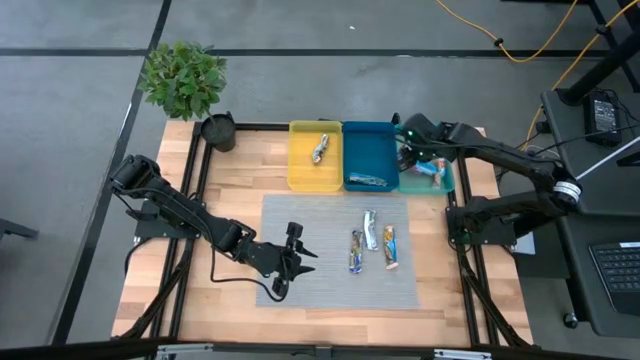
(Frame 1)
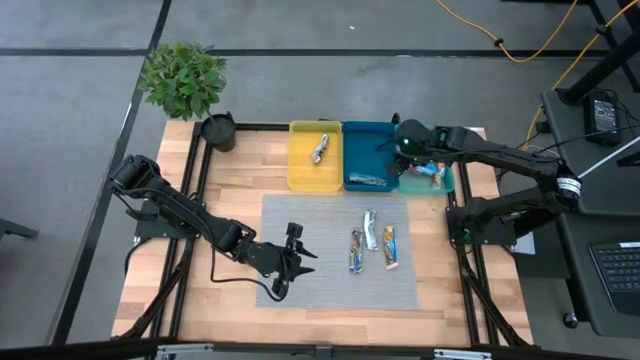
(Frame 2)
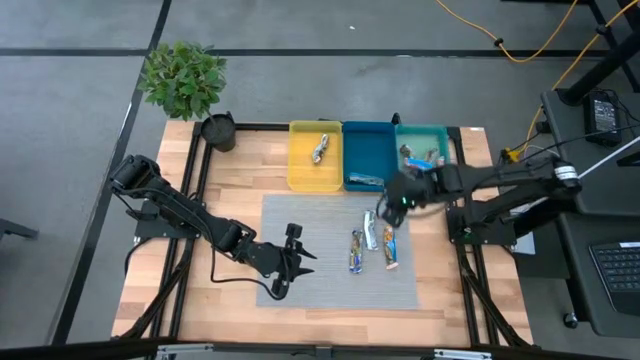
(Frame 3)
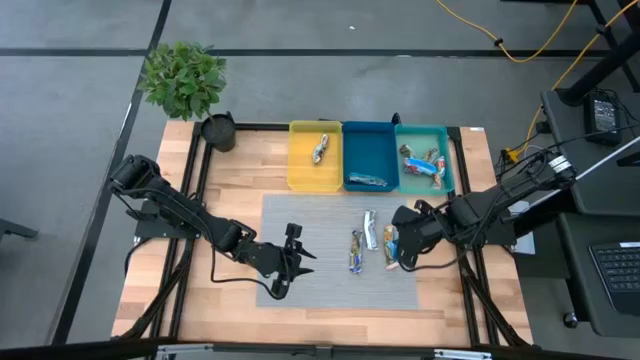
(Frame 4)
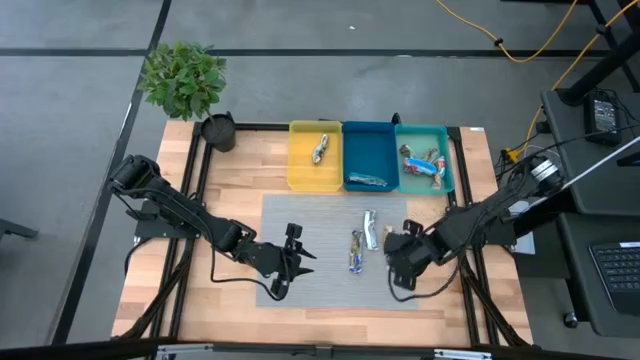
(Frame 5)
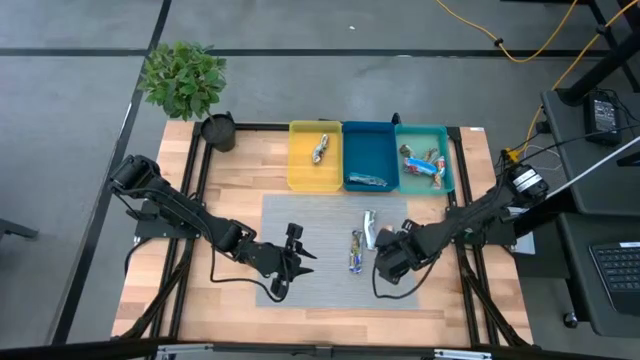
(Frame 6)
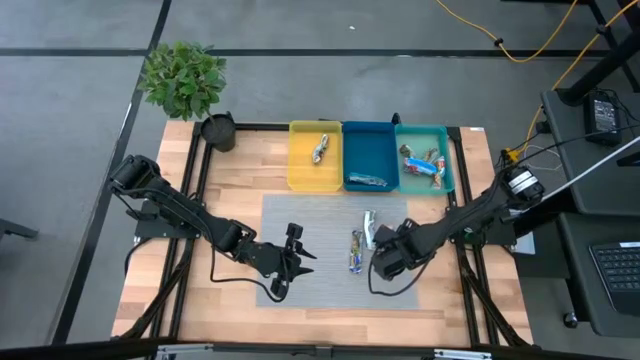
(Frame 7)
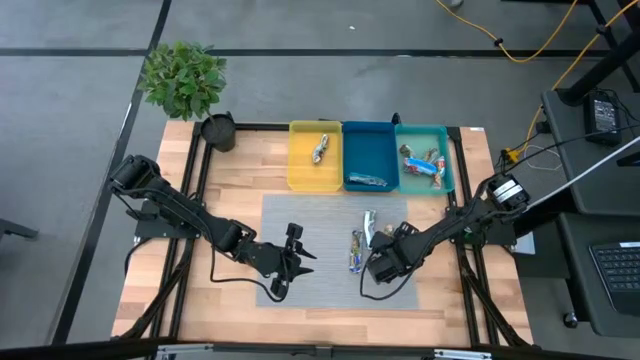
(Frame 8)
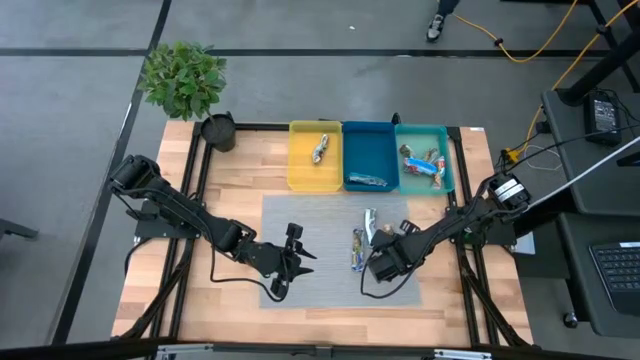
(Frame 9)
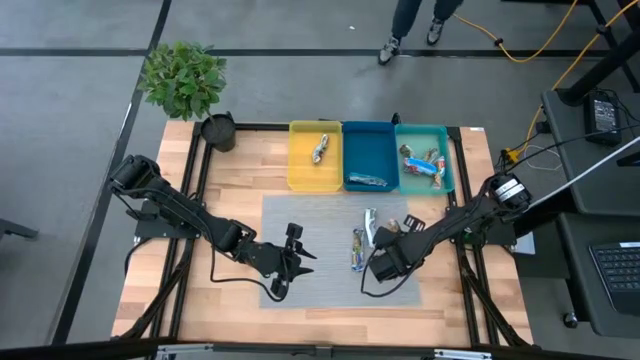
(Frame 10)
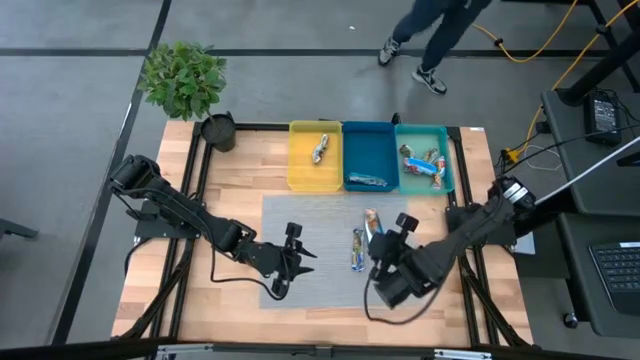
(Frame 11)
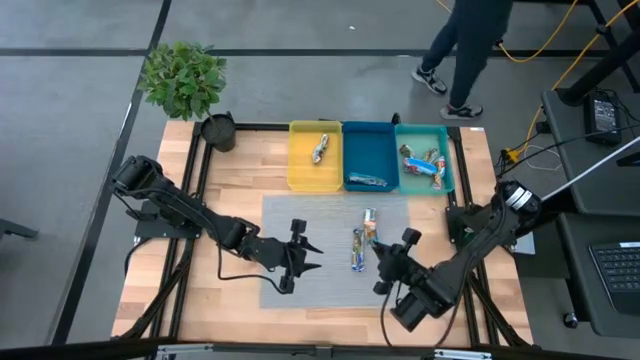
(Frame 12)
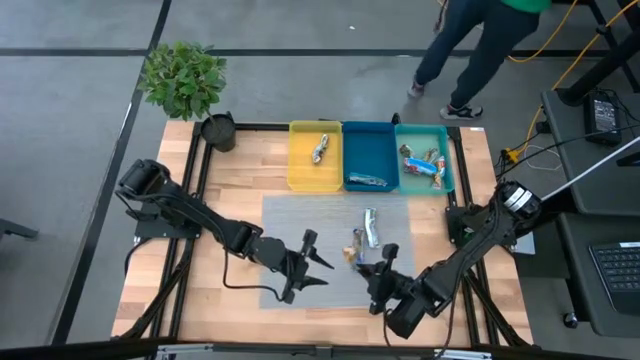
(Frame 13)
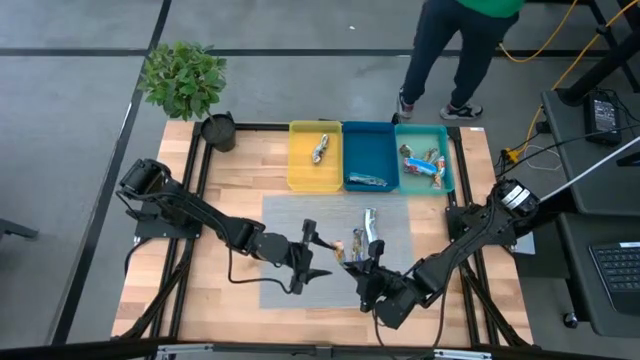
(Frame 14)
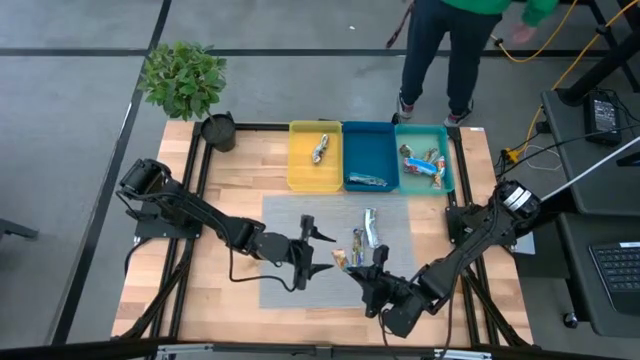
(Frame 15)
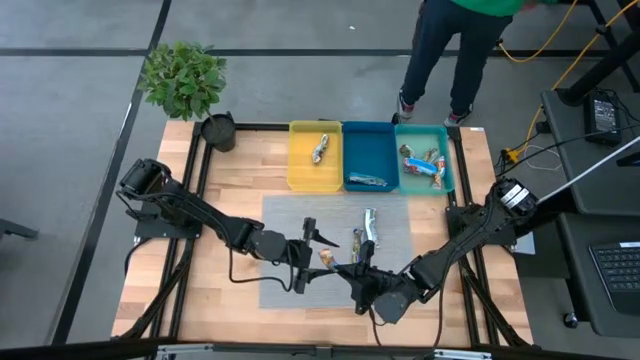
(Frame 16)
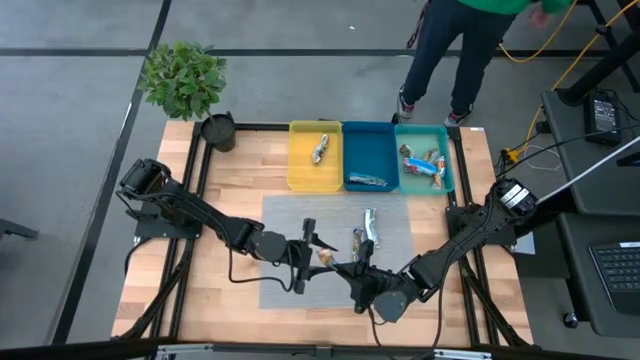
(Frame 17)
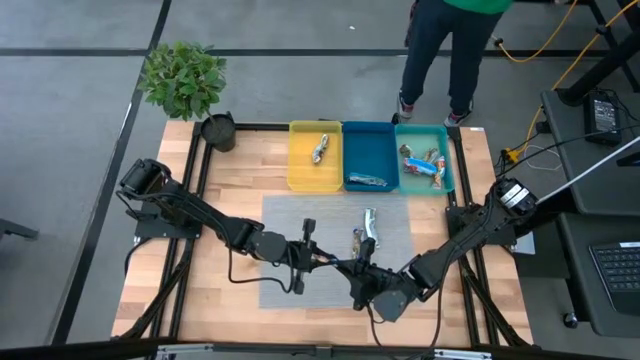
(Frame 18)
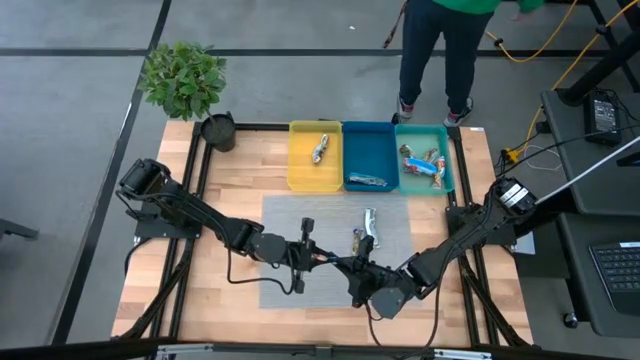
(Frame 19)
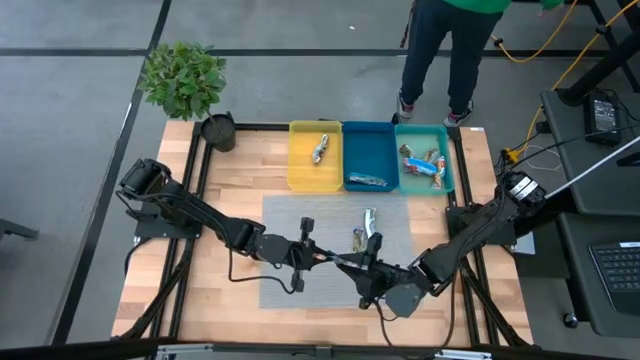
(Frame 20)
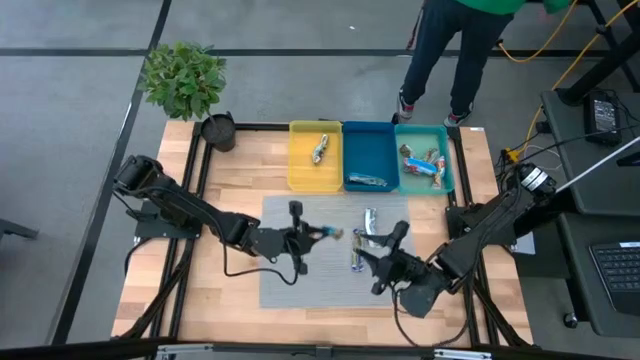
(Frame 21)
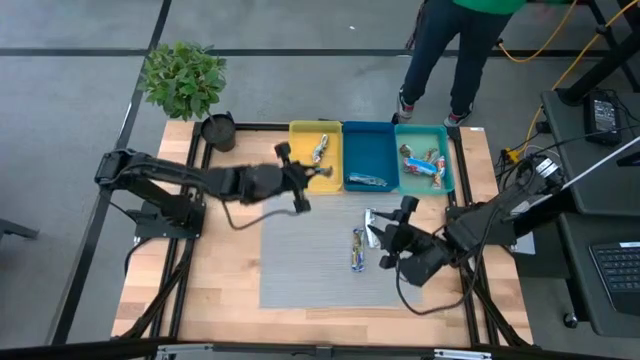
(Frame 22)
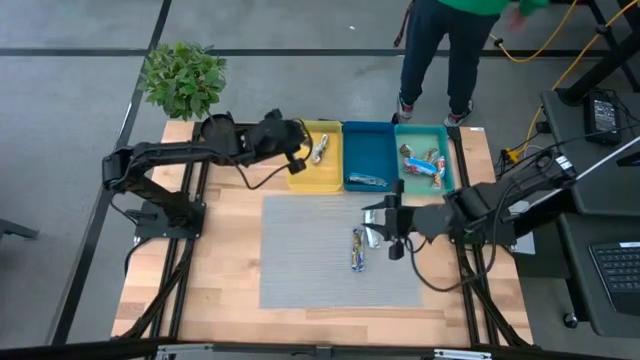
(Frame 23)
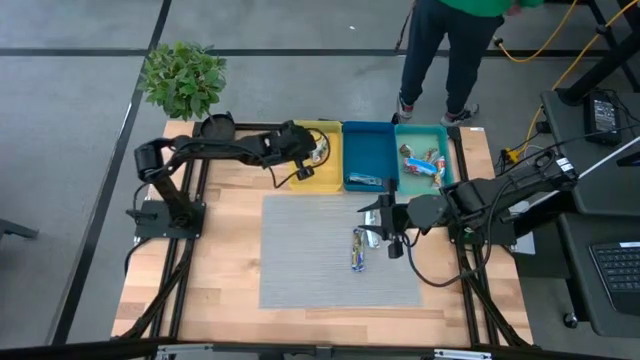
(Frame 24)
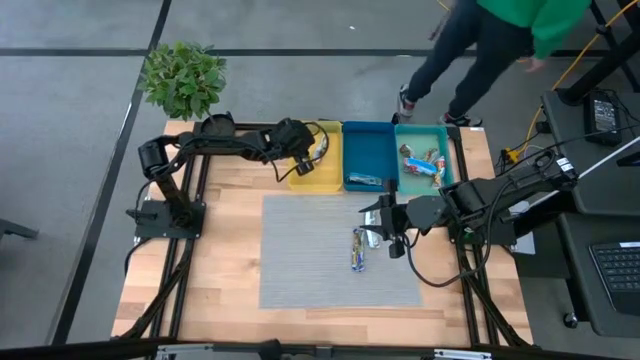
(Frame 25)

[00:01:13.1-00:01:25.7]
Task: Pick and place Granola Bars by type
Put the right yellow granola bar into the yellow bin

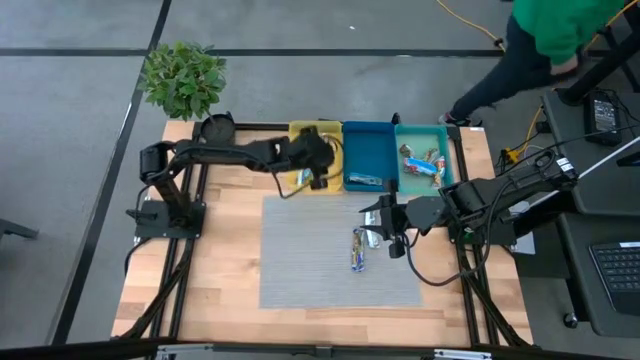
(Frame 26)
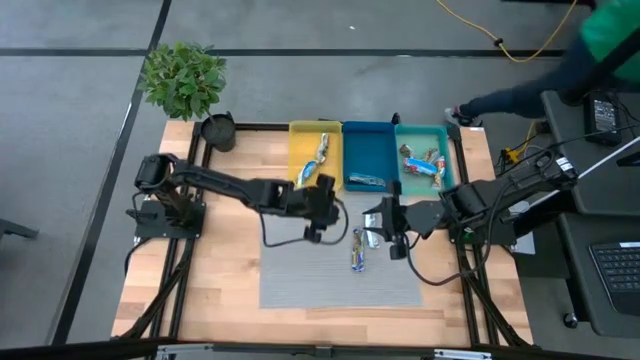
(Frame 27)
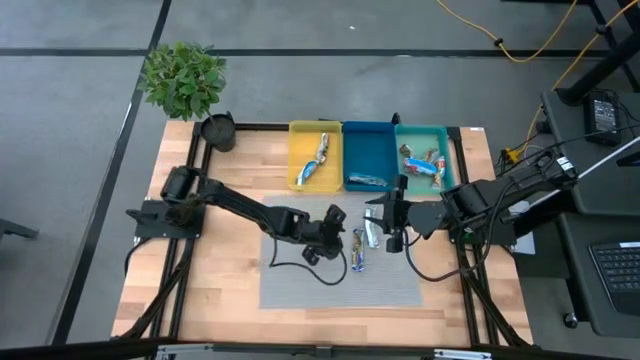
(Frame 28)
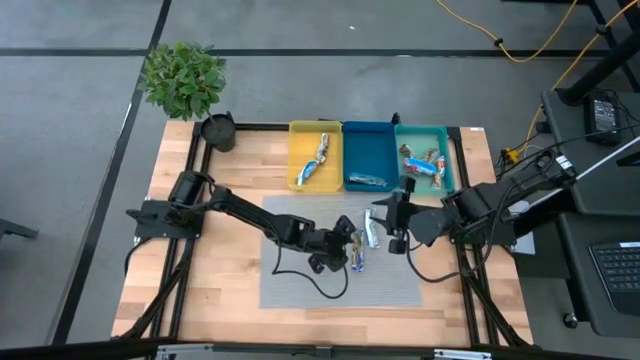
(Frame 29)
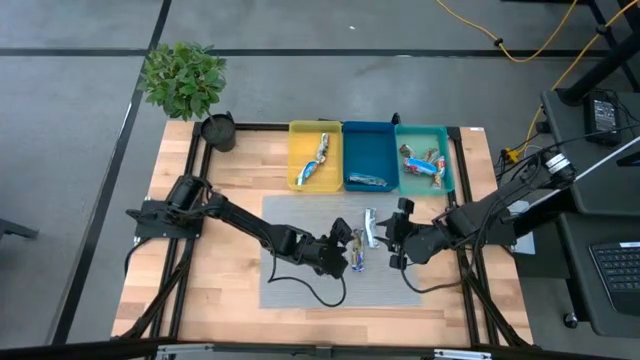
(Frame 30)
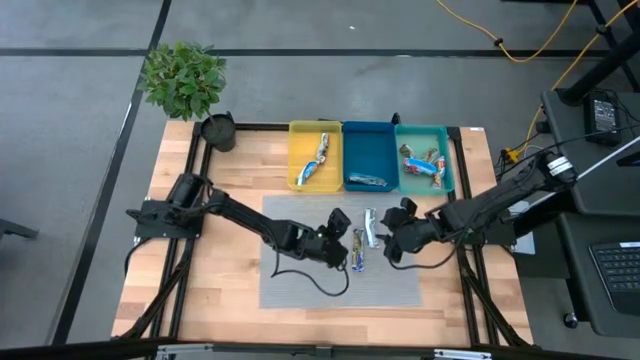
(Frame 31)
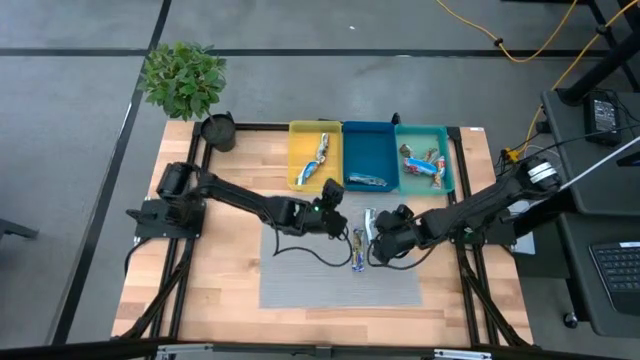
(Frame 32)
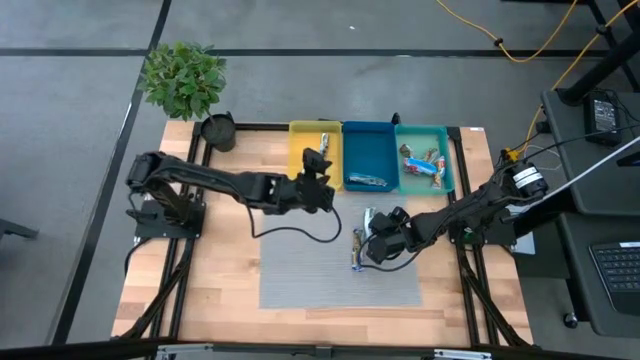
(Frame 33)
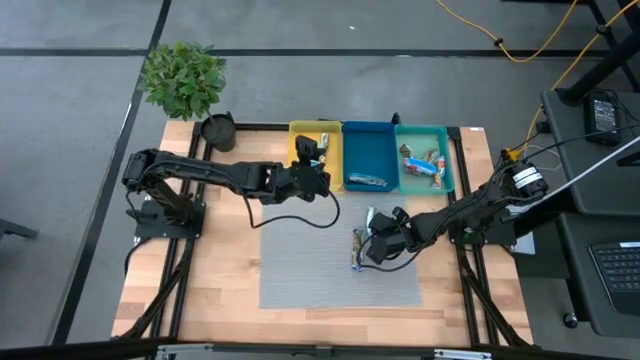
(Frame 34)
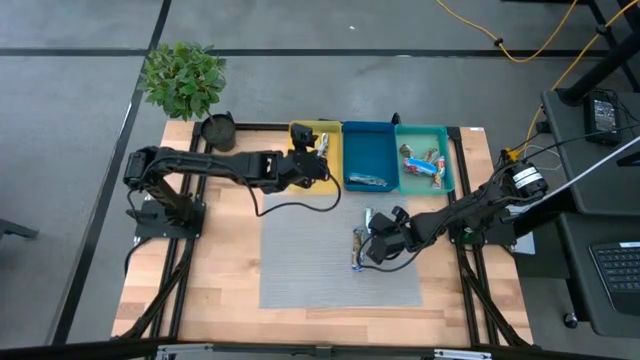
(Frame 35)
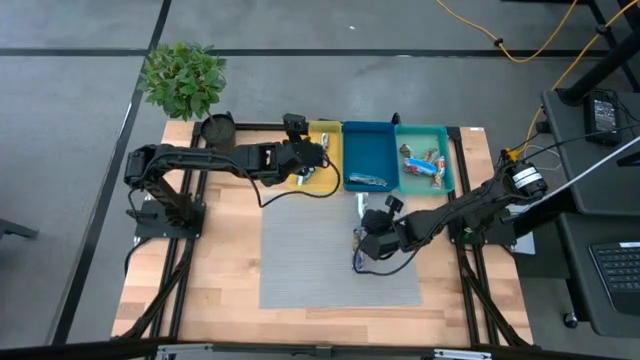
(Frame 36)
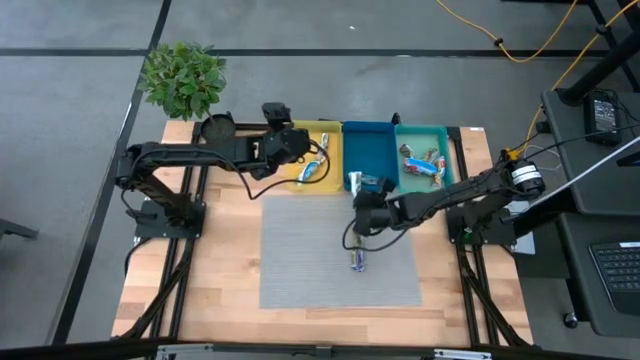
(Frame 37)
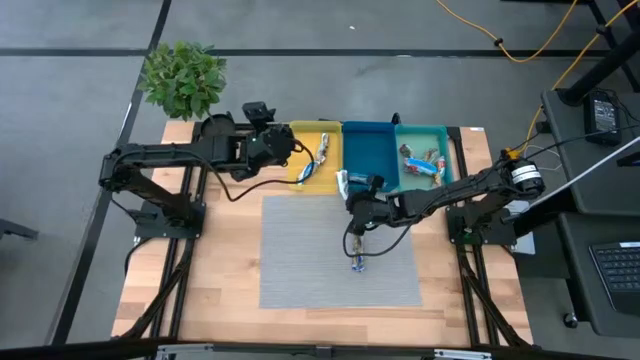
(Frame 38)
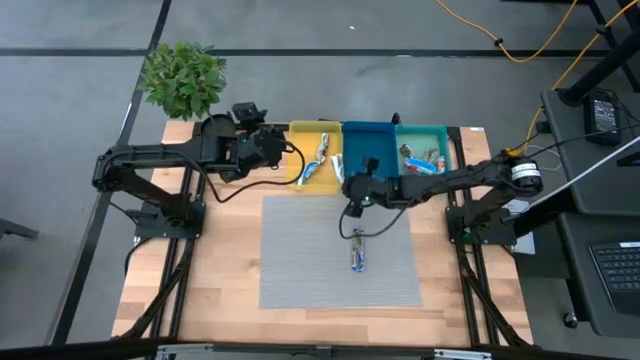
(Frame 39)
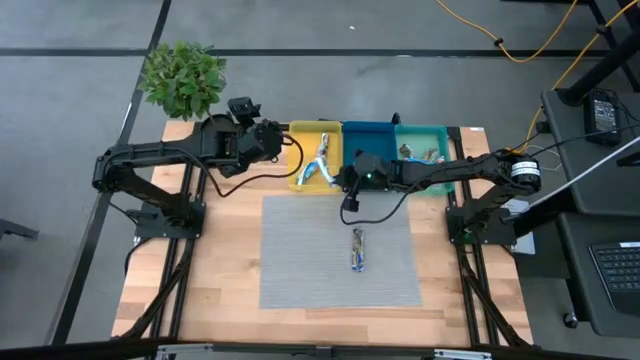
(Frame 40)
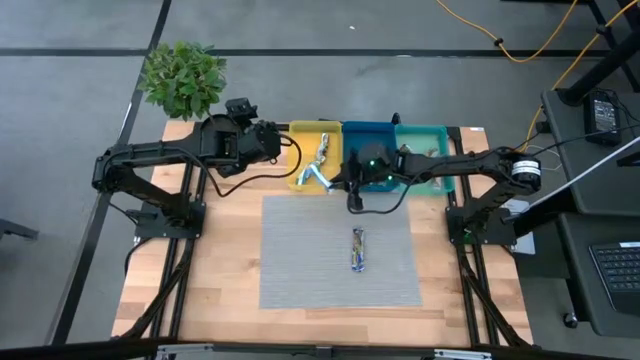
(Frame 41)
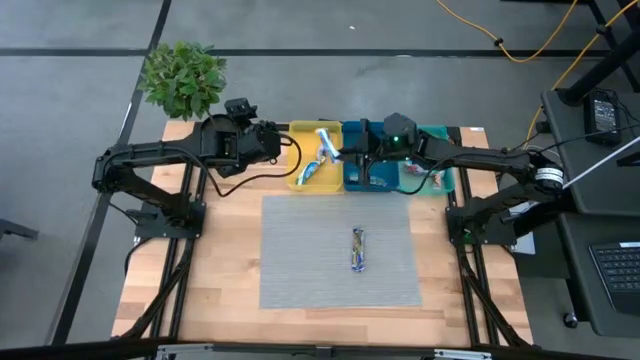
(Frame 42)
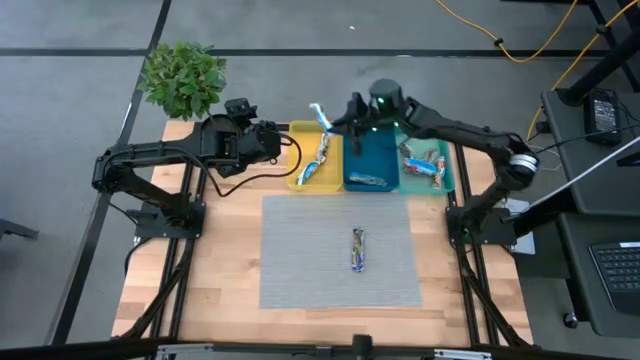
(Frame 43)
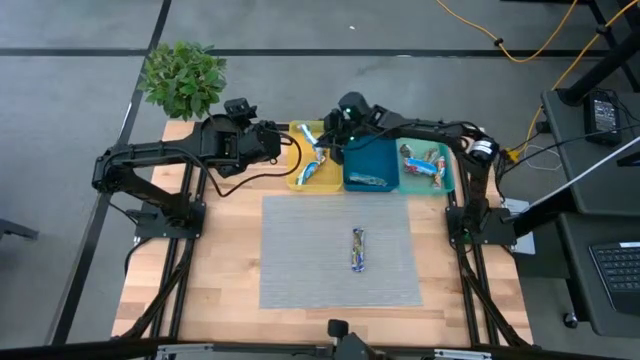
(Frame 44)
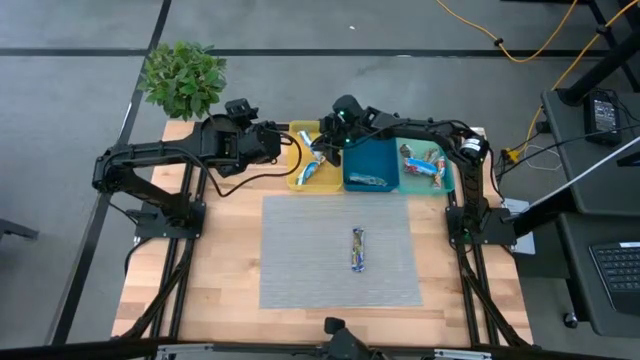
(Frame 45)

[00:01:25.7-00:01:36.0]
Put the yellow granola bar into the yellow bin
